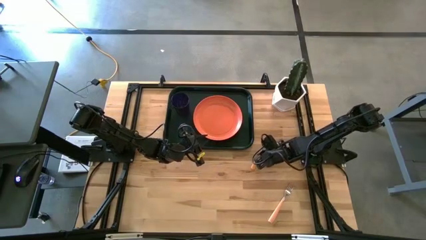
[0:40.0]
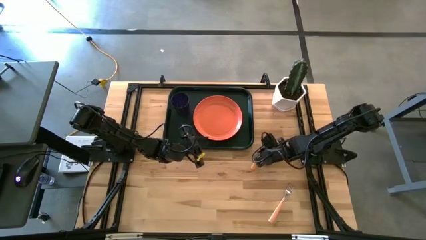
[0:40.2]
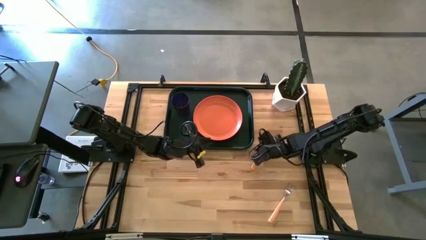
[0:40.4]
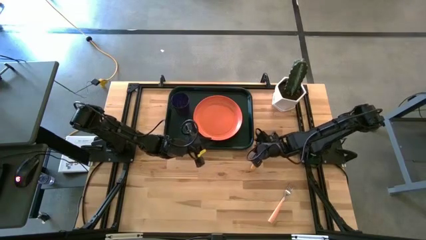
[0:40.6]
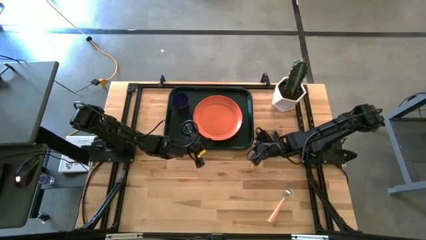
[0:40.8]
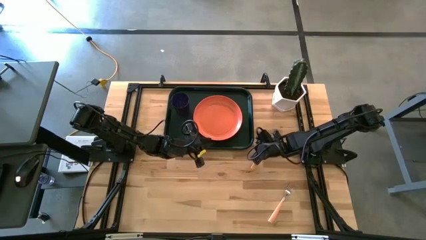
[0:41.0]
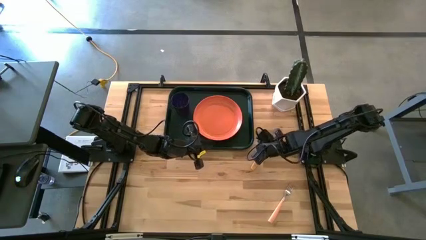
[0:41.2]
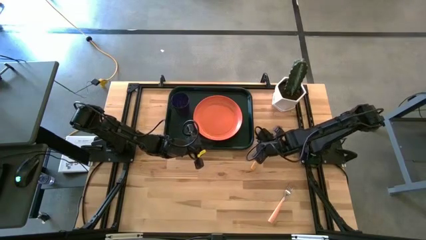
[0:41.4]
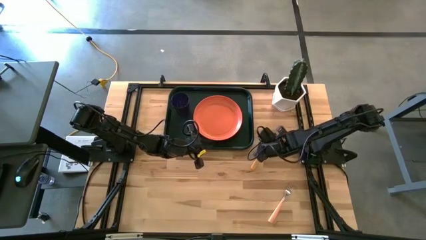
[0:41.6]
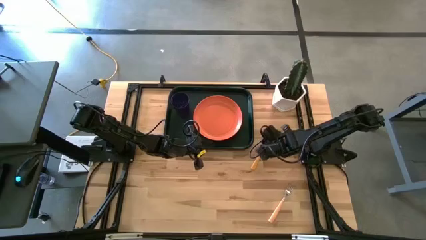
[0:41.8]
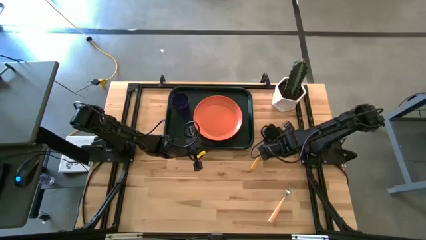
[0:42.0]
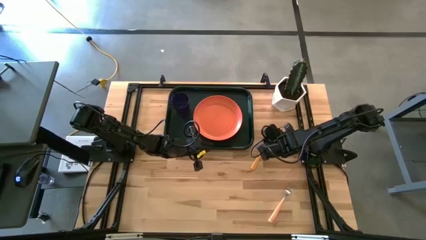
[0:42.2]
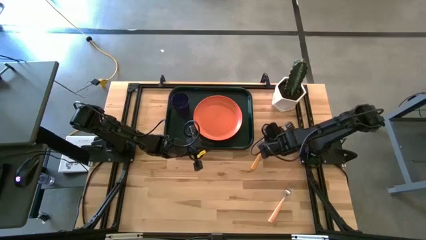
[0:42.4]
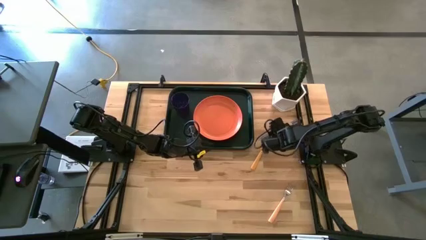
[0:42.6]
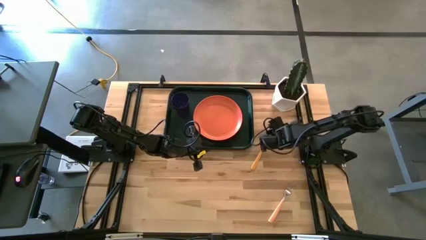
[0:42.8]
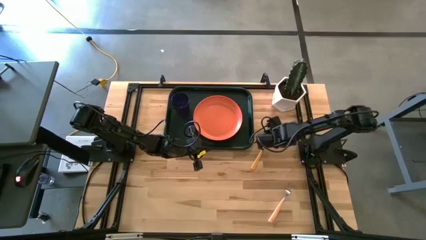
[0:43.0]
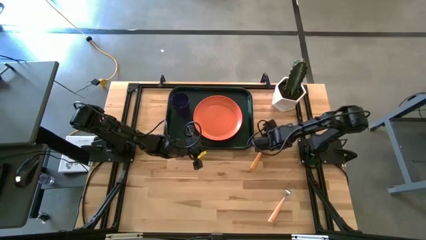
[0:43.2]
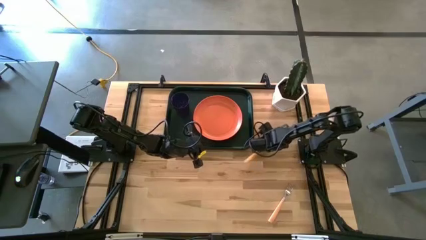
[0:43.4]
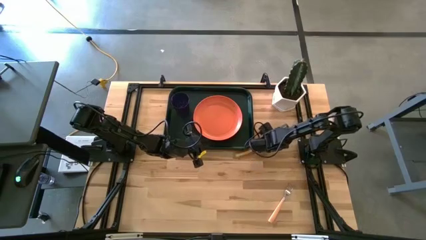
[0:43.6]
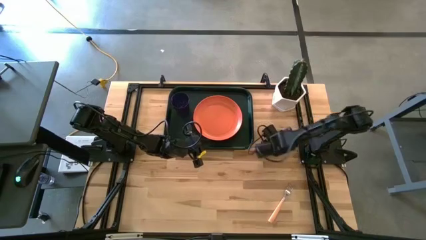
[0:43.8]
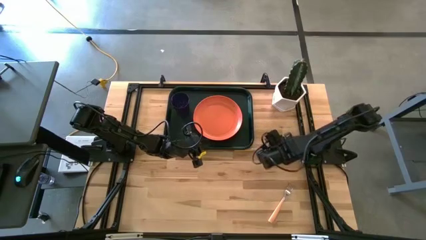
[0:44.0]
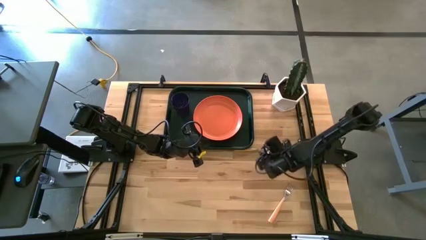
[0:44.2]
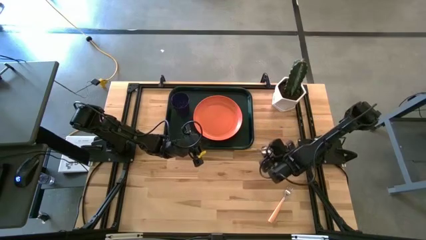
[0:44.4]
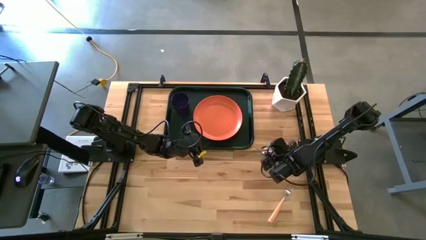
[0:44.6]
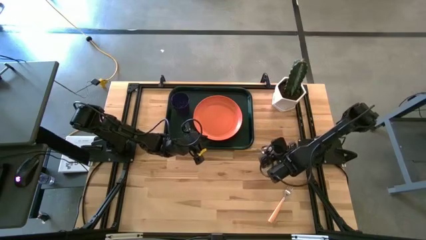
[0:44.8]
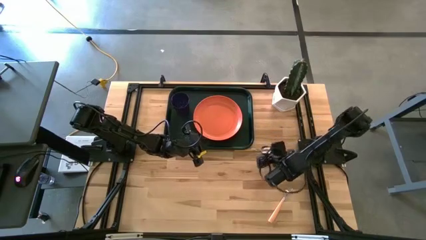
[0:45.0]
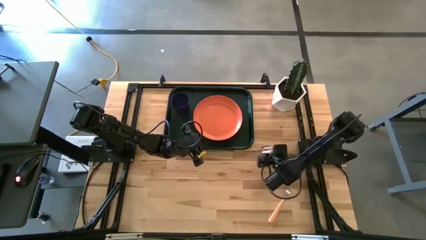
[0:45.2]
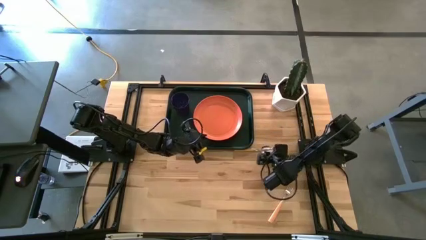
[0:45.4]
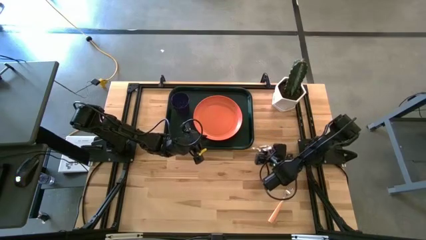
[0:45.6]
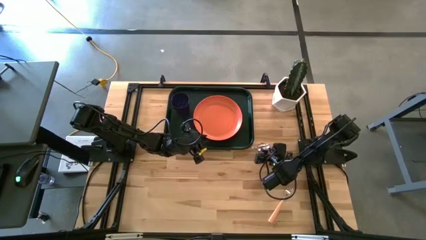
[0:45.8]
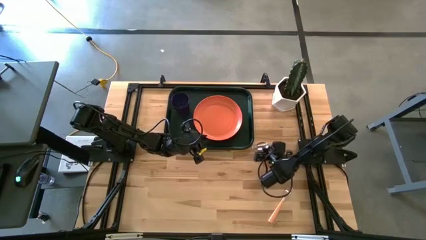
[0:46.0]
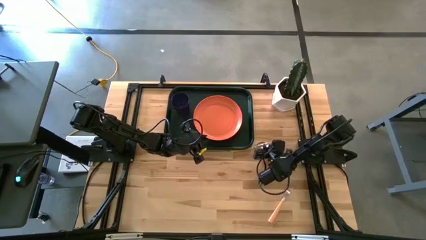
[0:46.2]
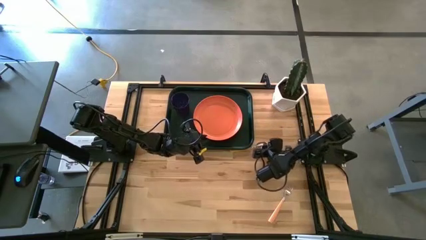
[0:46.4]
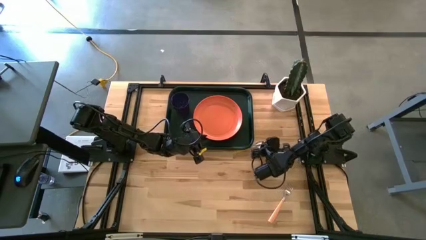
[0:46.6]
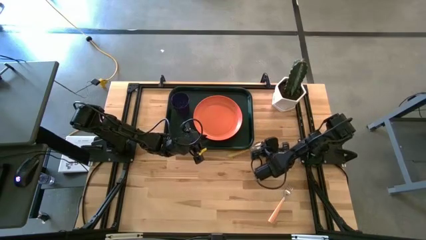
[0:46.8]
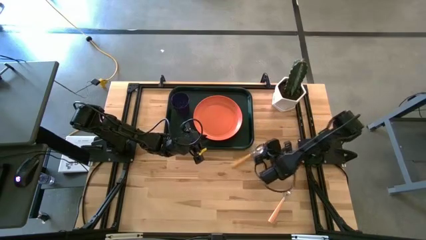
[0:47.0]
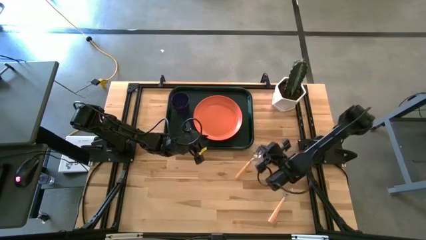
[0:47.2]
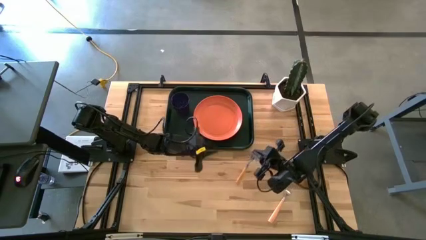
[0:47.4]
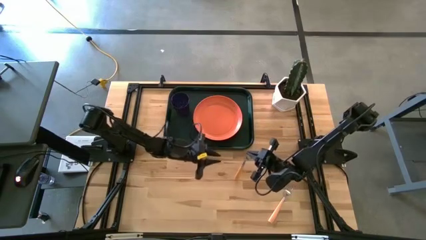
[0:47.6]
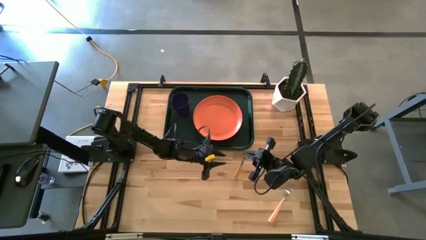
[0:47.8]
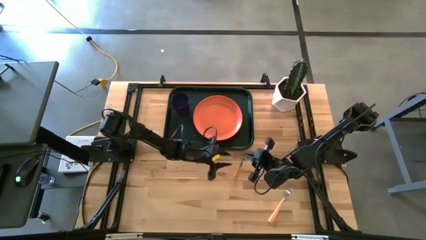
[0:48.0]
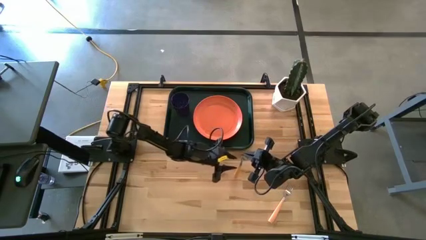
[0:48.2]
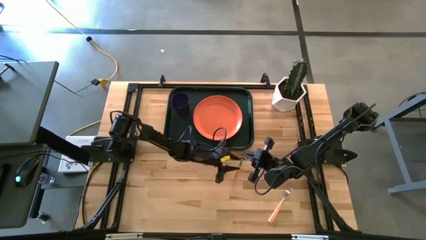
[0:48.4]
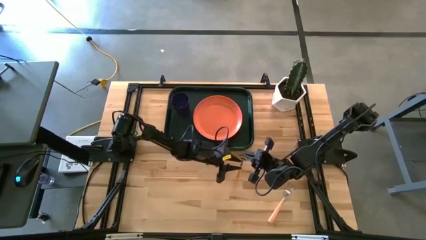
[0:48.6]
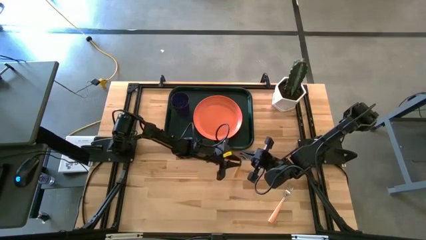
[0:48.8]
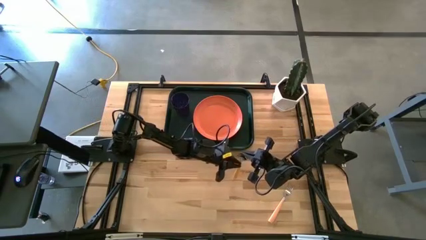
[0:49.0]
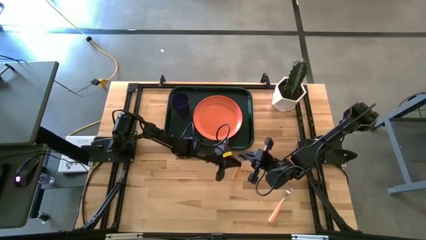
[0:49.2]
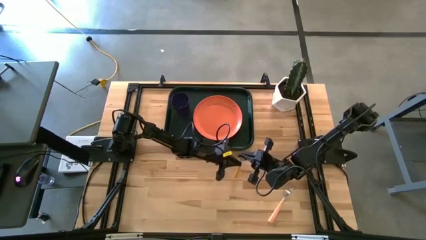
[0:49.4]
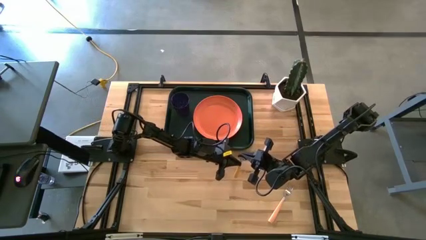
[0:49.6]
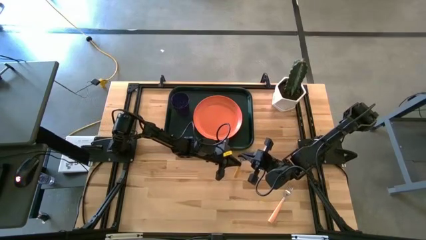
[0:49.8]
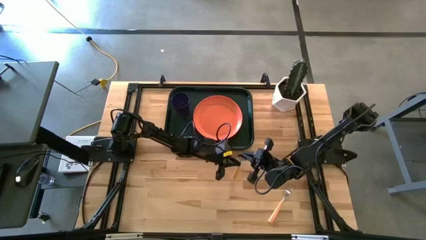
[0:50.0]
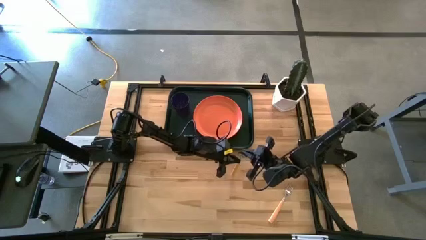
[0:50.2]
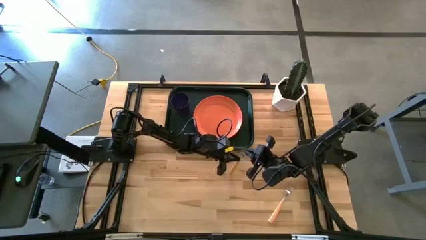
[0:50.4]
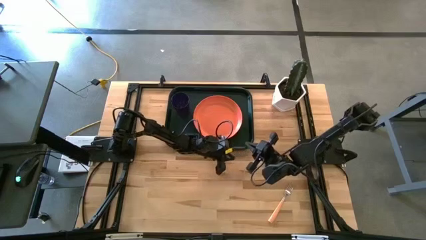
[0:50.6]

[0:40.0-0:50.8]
Task: Pick and place plate/cup/fork/spoon on tray
Put the spoon into the left side of the serving tray

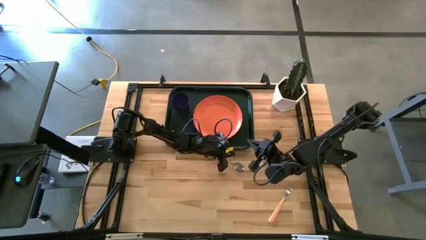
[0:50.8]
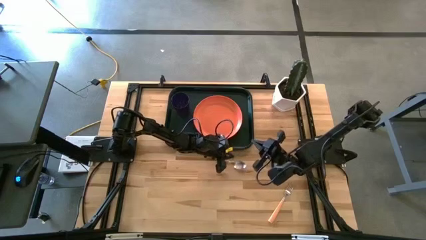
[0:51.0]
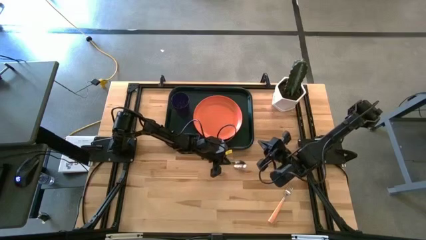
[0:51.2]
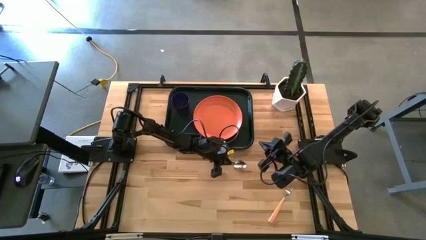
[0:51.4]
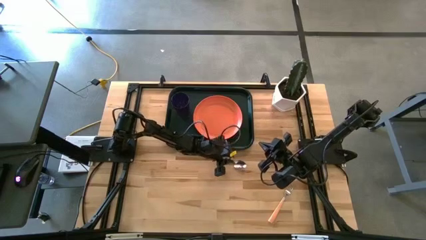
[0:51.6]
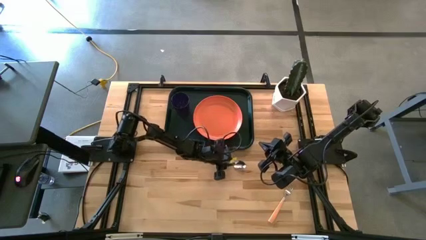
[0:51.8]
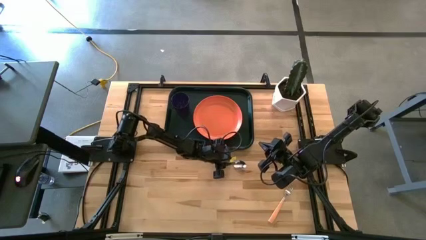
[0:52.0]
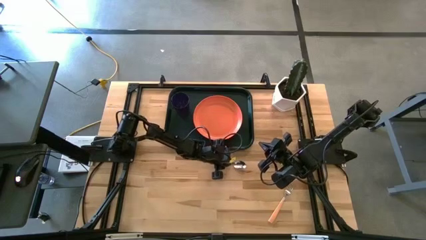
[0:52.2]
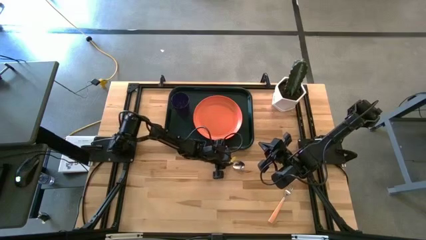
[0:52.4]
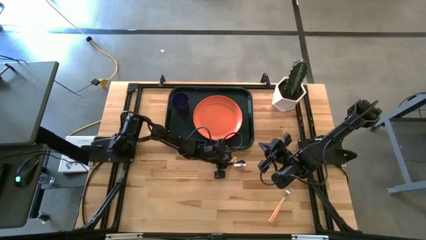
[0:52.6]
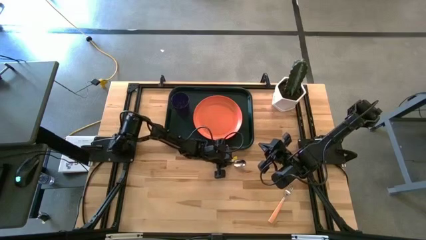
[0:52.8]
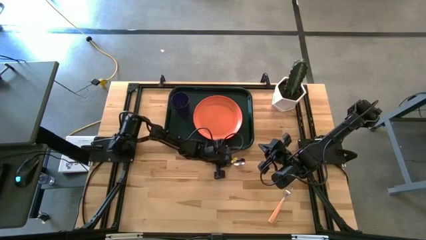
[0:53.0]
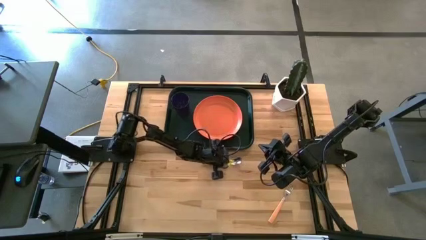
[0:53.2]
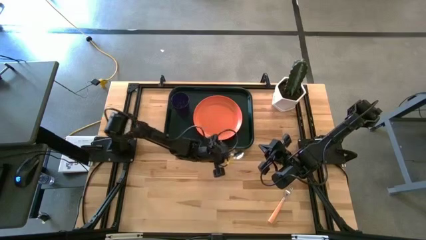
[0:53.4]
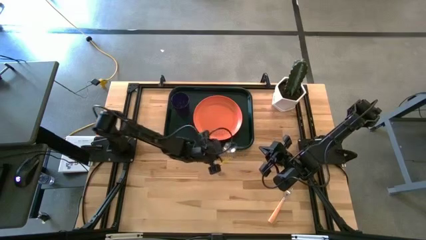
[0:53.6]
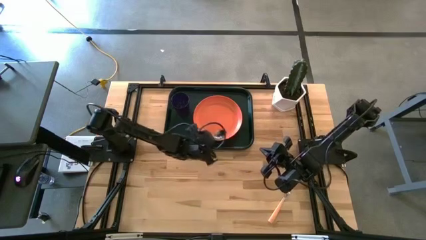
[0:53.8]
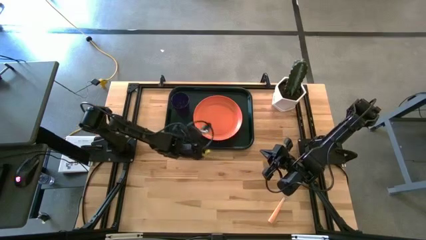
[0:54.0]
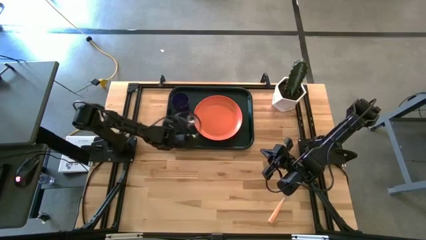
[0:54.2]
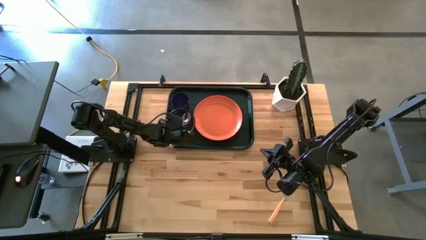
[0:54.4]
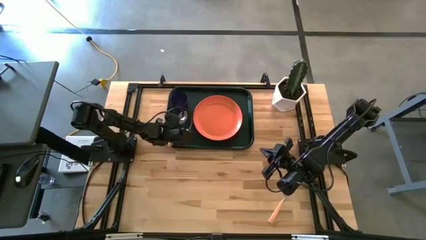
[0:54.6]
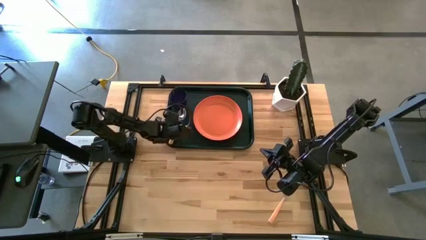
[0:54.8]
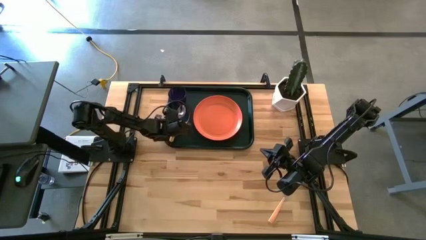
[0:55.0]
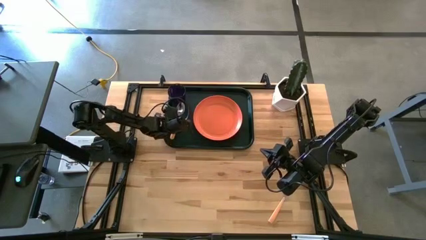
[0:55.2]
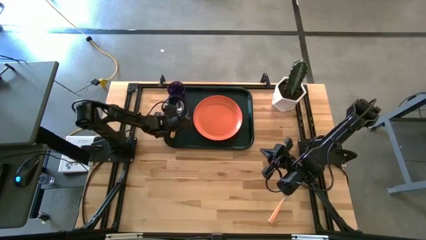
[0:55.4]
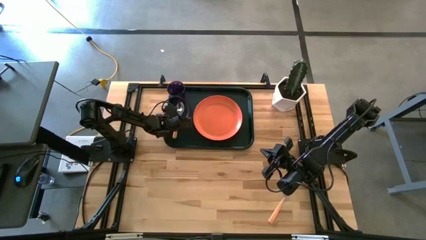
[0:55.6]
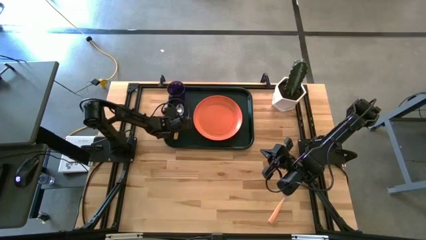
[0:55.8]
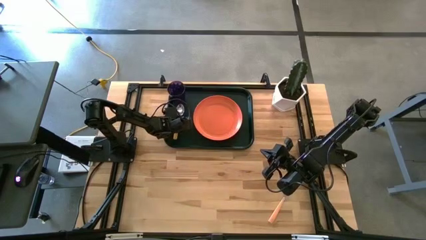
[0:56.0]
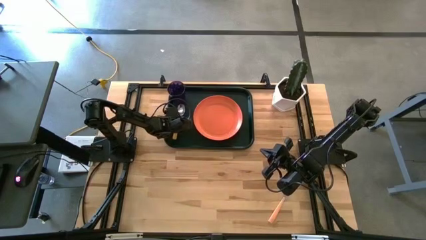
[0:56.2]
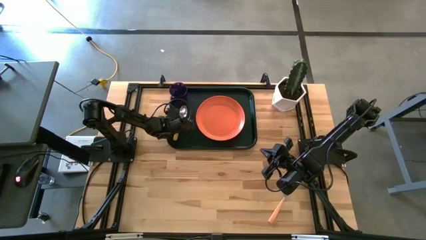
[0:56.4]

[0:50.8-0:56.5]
Put the spoon into the left side of the serving tray

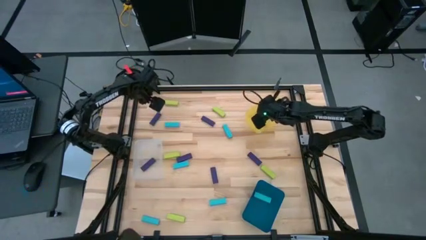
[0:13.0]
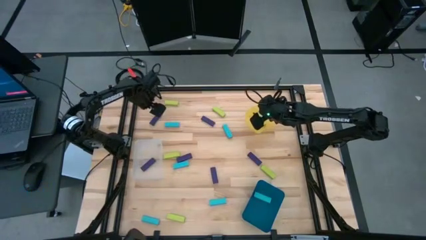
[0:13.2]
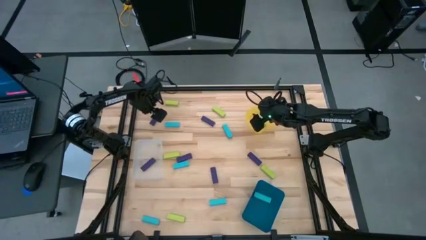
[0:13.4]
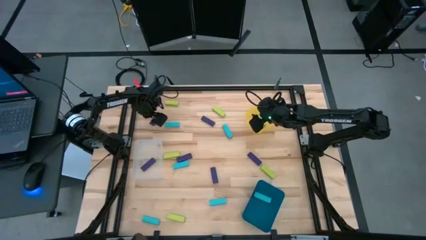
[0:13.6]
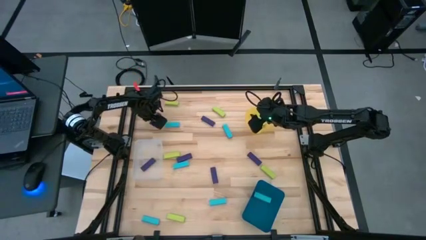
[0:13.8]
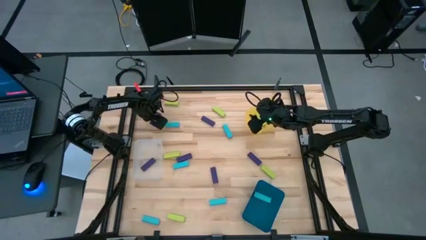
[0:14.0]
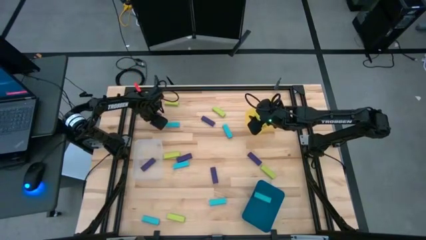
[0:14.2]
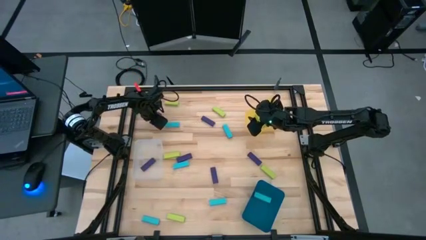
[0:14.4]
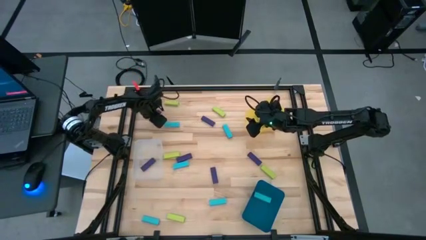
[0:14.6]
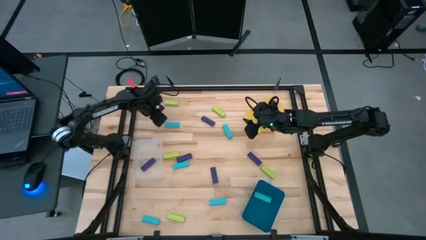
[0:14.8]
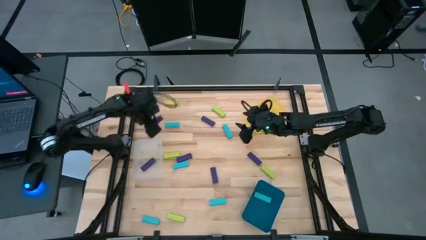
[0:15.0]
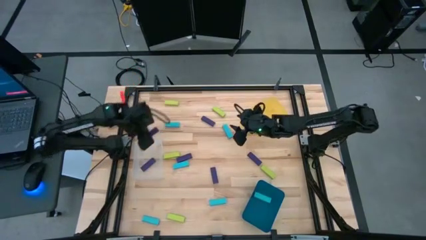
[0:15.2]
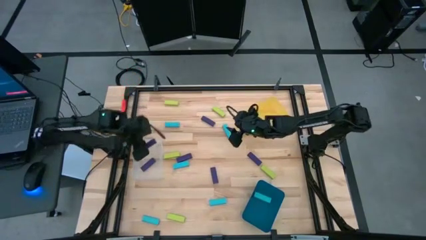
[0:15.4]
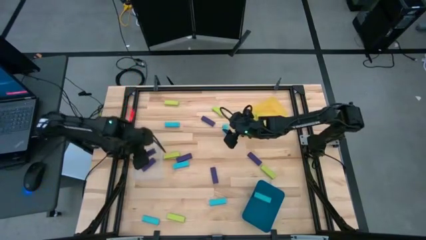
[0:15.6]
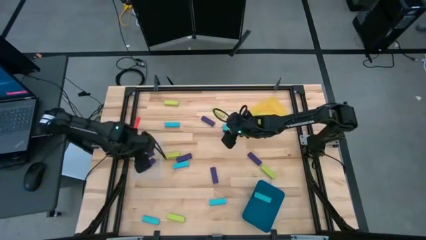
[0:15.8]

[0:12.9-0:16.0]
Task: Sort blocks
Put the violet block into the transparent bin
